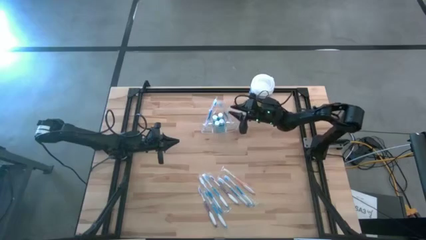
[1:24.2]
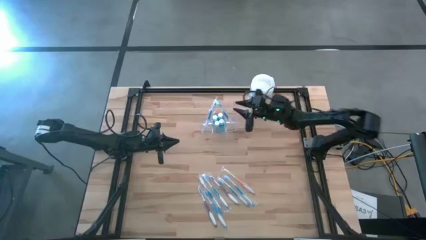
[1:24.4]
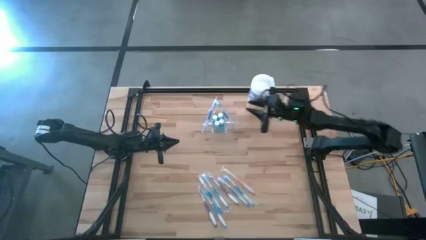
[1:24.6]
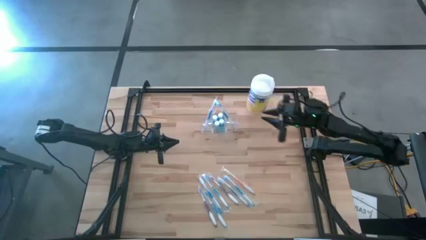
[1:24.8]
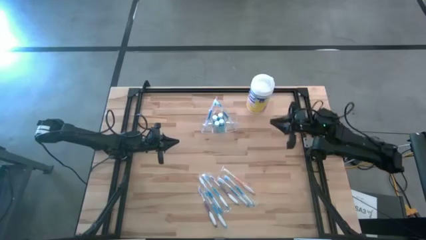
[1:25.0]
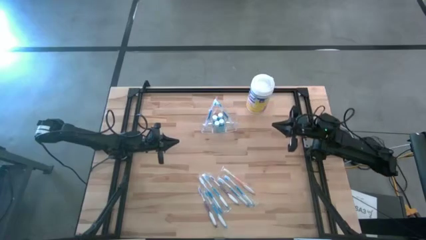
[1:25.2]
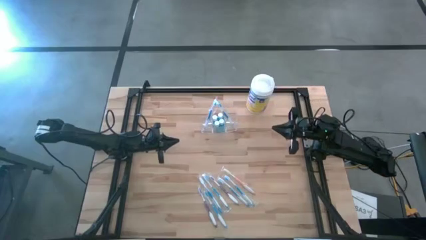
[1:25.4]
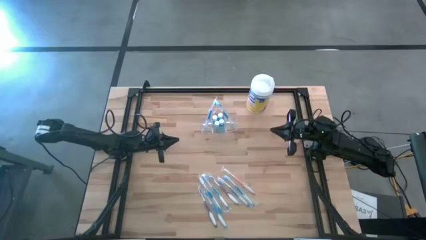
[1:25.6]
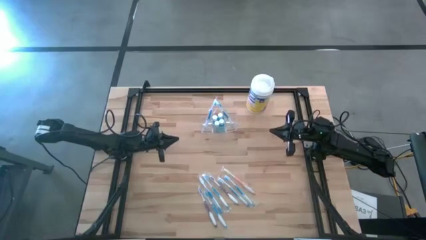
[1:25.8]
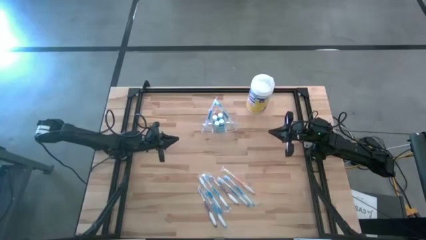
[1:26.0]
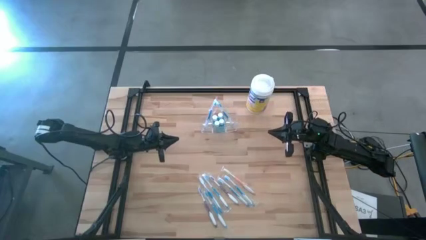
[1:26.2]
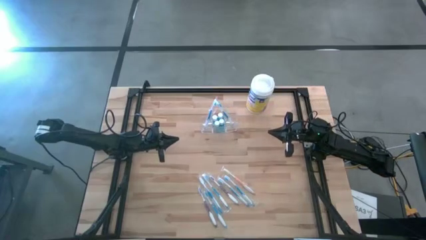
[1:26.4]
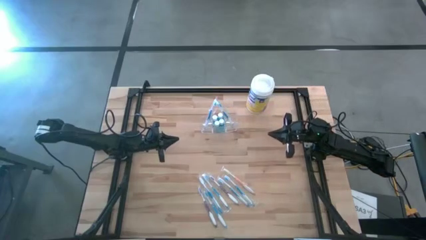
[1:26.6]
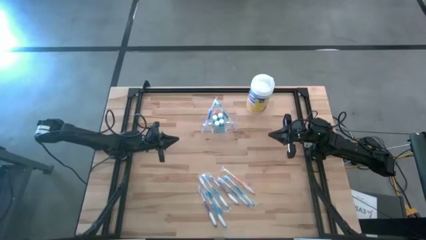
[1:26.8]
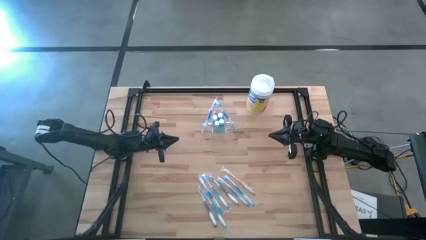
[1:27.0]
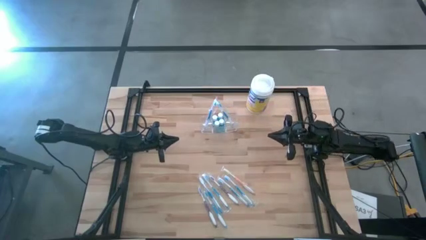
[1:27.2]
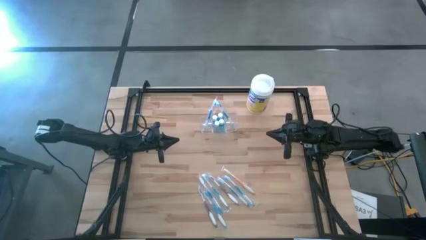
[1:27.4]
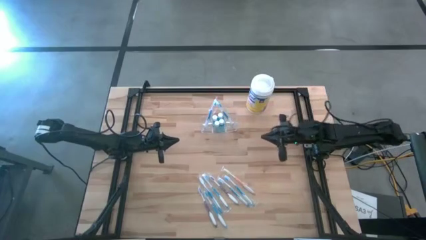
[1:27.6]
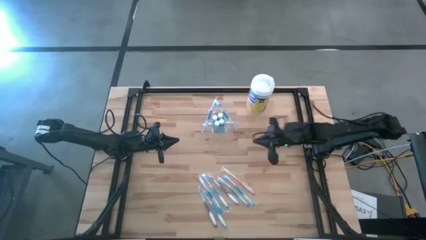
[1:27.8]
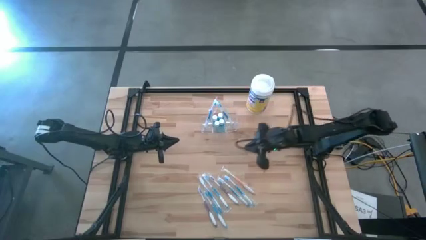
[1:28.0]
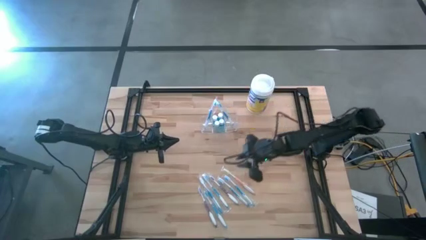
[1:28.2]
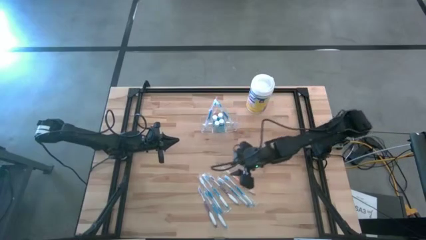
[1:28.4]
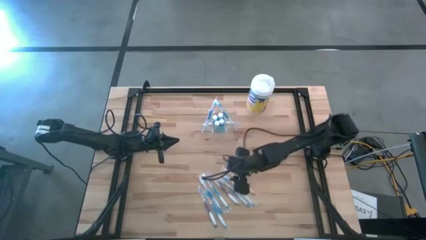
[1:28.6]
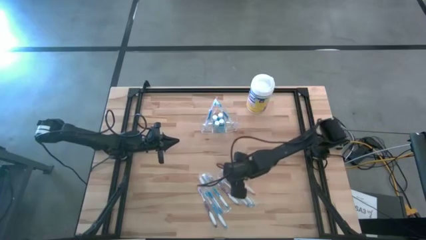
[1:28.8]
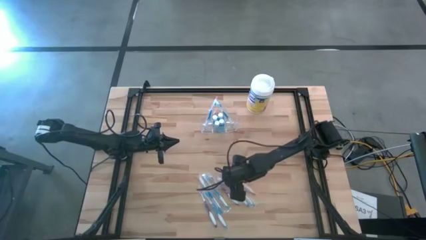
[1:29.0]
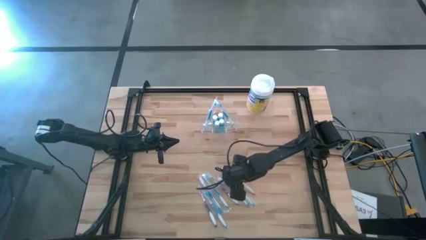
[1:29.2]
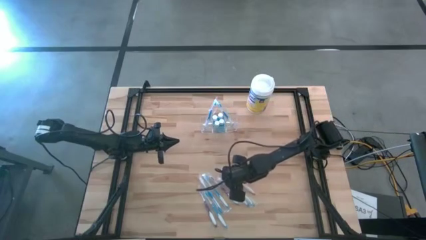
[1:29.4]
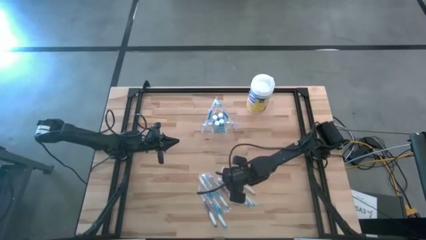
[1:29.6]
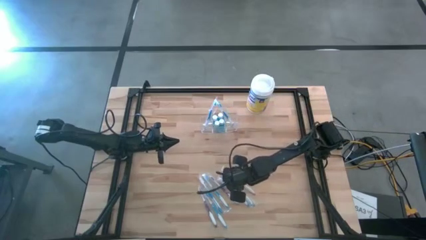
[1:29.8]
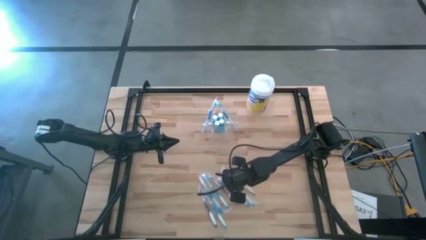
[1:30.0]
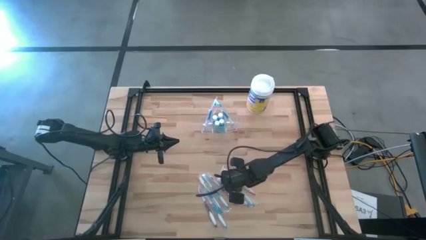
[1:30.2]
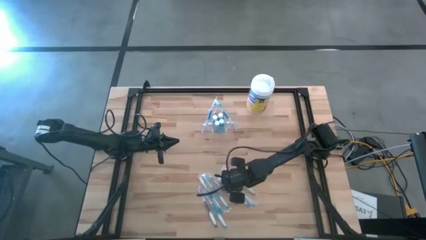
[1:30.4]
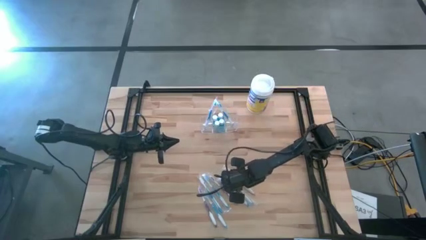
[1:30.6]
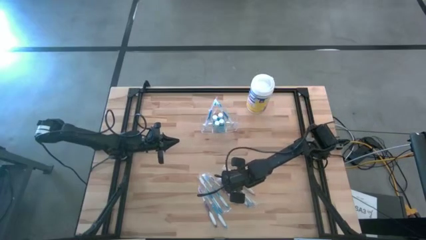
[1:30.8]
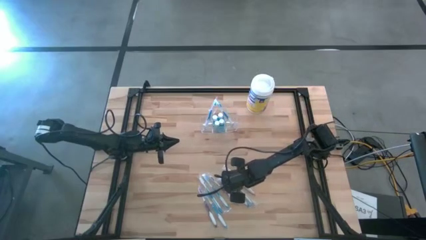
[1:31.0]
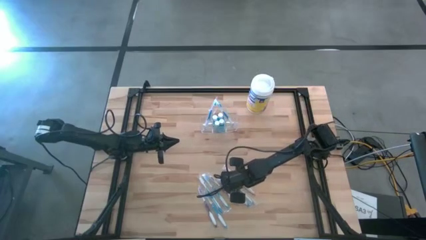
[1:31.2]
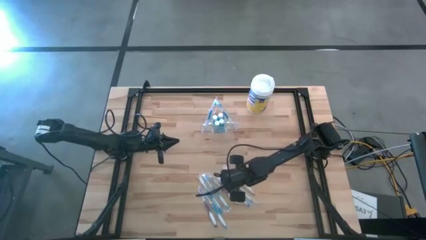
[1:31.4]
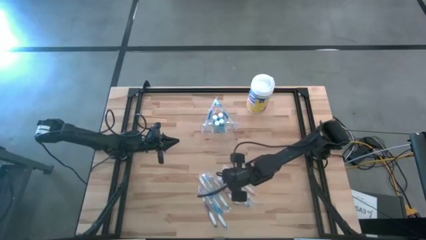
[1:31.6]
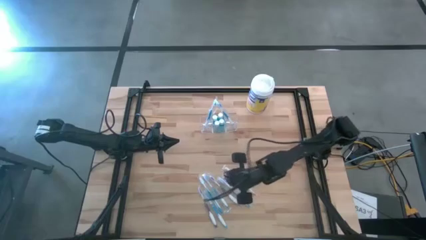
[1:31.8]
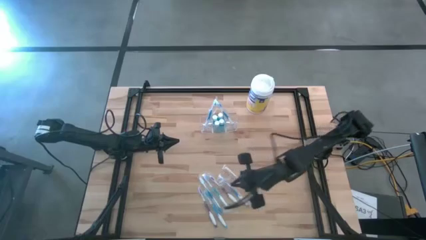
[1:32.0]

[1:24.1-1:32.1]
Task: Pick & Place toothbrushing station
Put the blue toothbrush into the transparent organizer

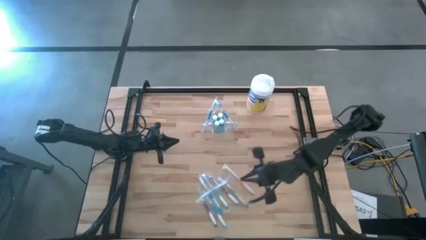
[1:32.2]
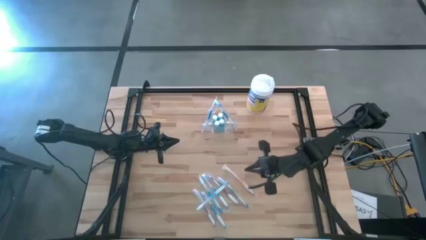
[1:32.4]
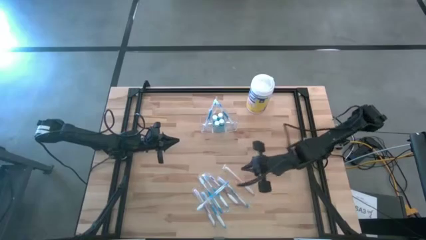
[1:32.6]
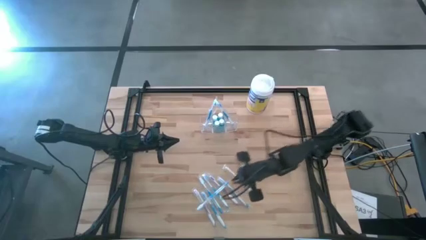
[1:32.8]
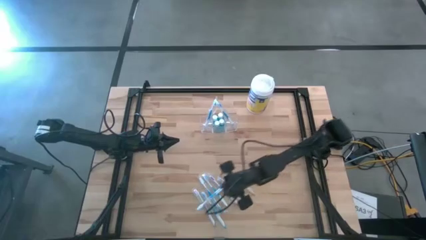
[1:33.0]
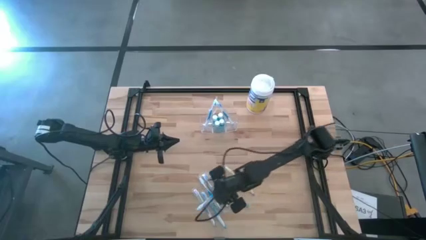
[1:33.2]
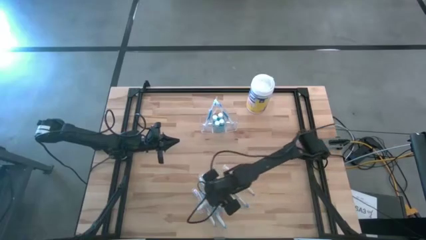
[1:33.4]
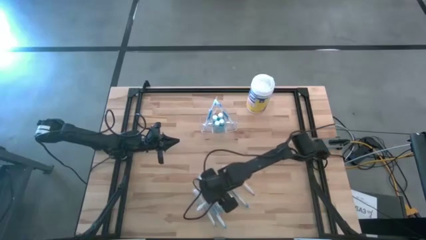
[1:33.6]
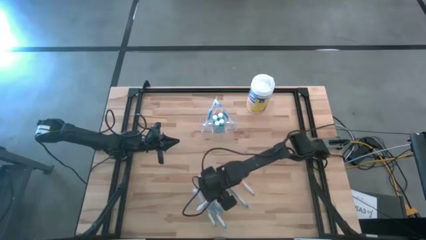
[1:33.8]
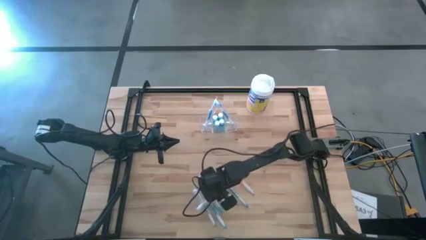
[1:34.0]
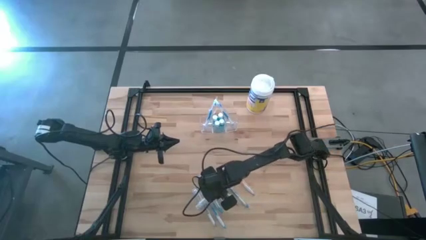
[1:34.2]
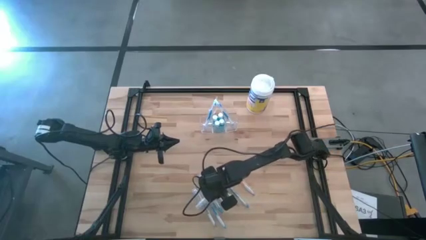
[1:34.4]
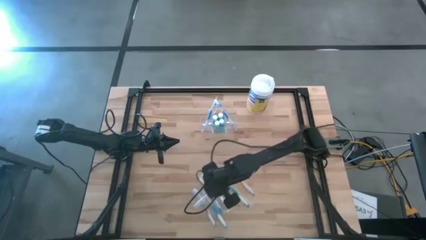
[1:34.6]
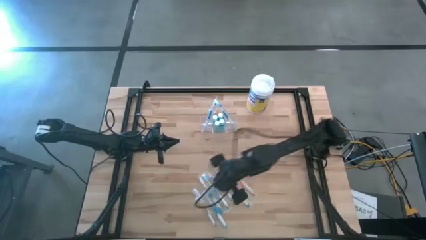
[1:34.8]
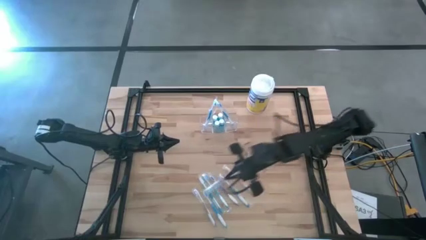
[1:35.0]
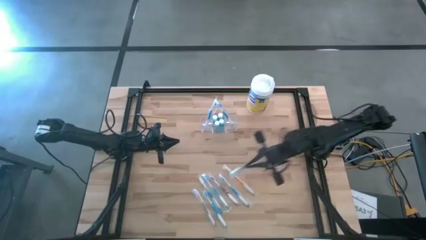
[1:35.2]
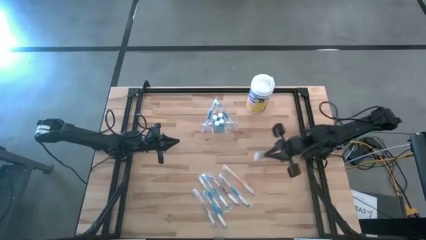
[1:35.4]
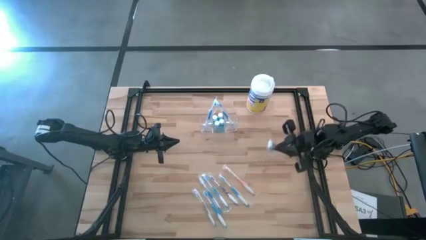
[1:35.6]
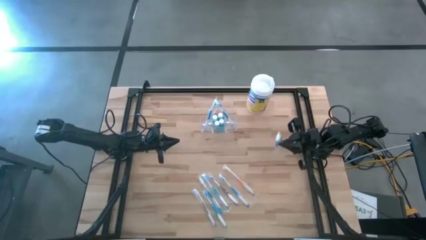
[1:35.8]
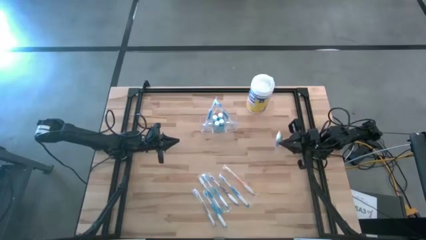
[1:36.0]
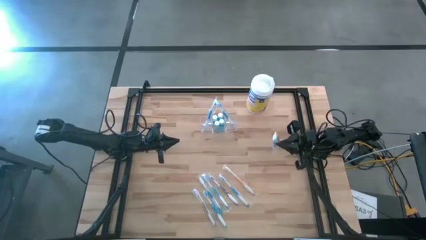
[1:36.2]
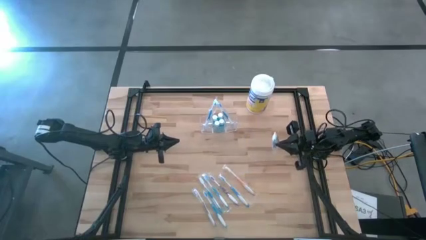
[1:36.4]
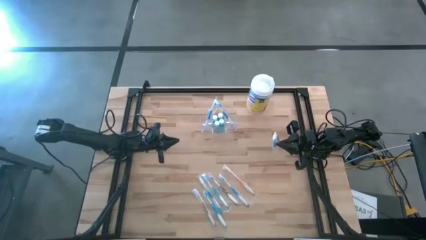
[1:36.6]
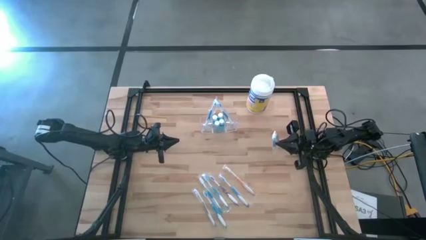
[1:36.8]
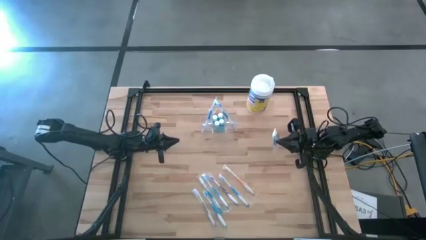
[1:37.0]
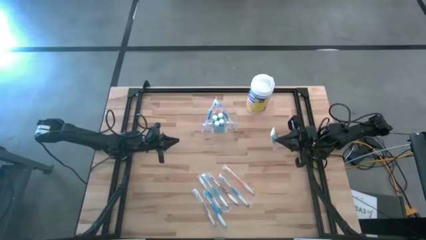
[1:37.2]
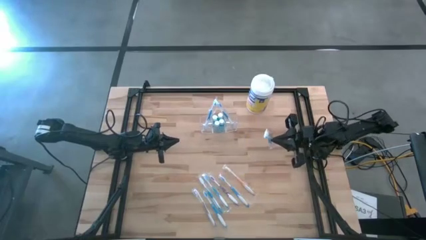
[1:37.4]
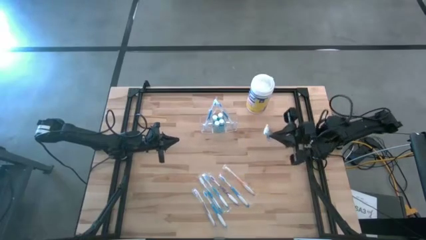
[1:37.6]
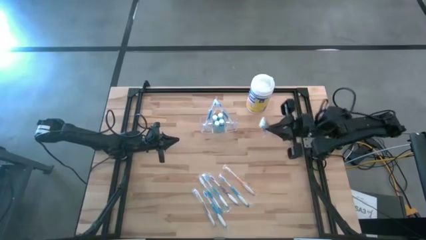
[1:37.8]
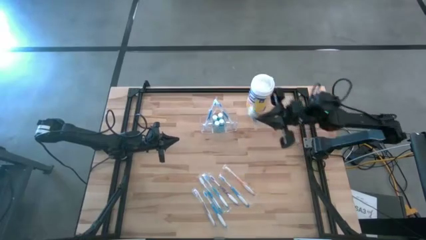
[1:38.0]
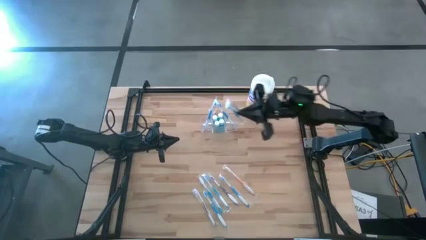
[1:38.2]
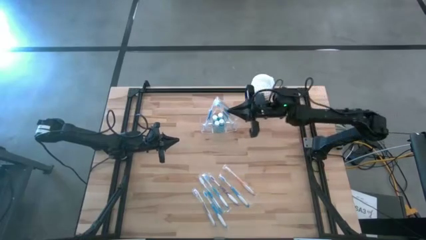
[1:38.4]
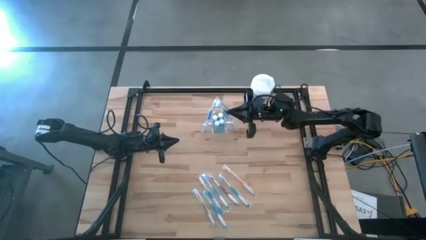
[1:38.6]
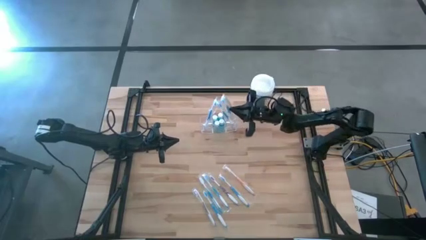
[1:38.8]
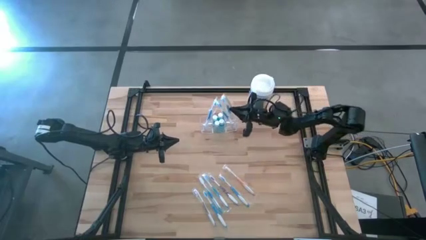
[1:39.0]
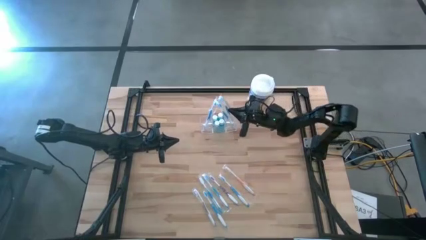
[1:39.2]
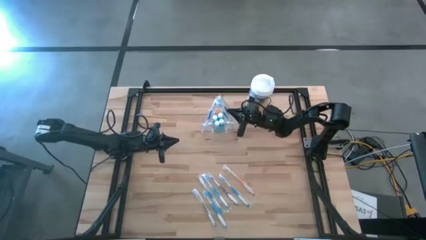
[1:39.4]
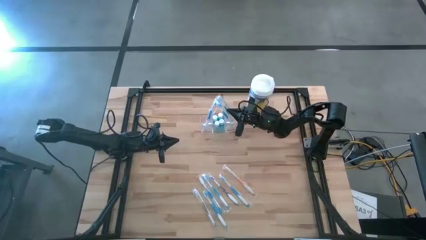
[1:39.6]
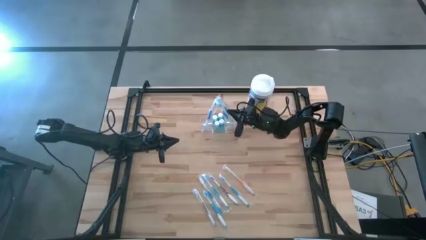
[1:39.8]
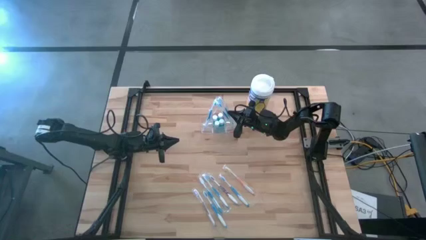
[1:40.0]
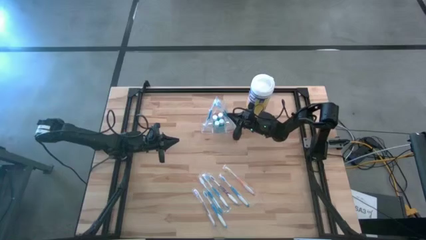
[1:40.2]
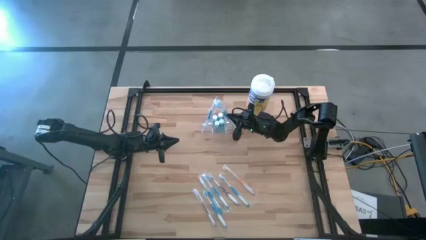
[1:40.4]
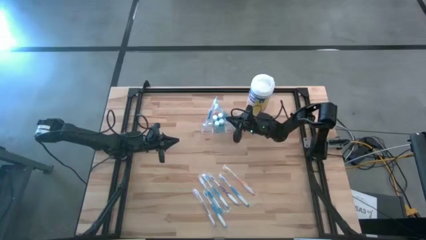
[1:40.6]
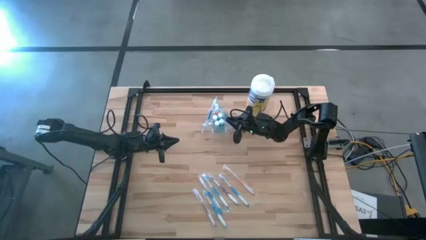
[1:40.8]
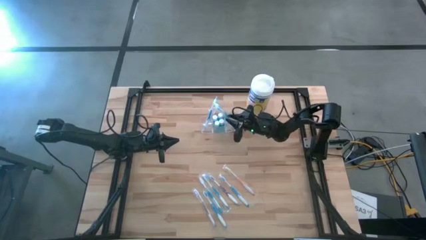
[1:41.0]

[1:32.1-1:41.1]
Put the blue toothbrush into the transparent organizer
